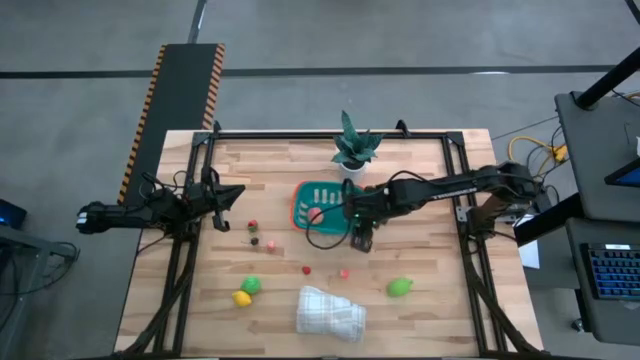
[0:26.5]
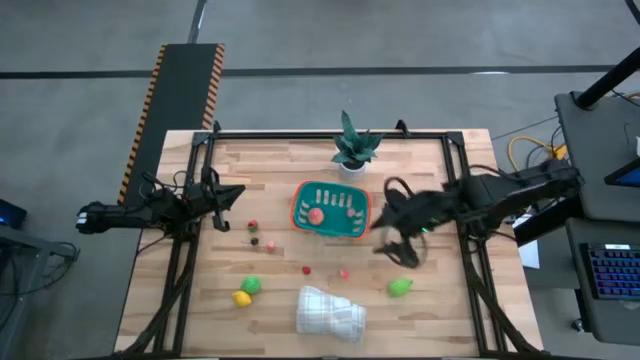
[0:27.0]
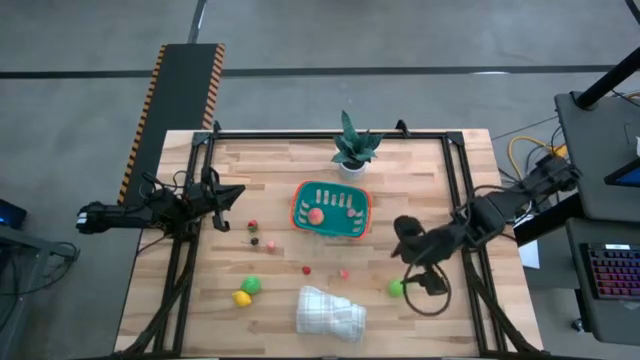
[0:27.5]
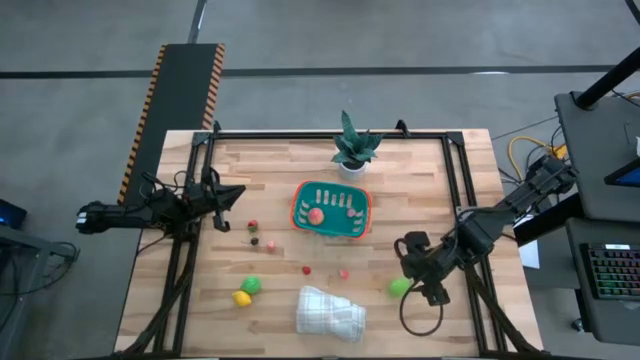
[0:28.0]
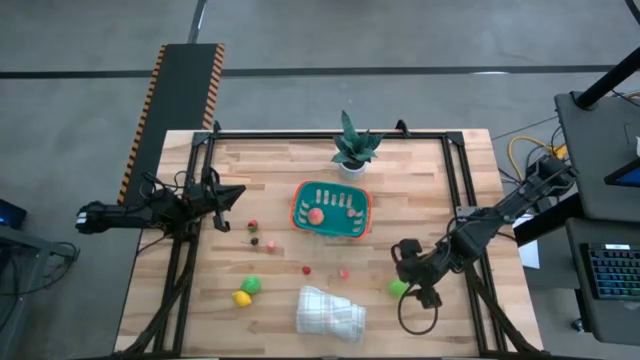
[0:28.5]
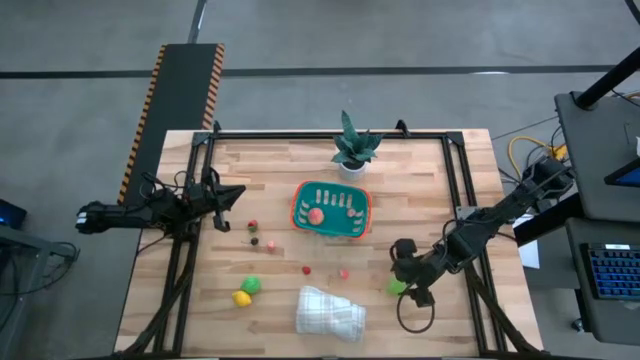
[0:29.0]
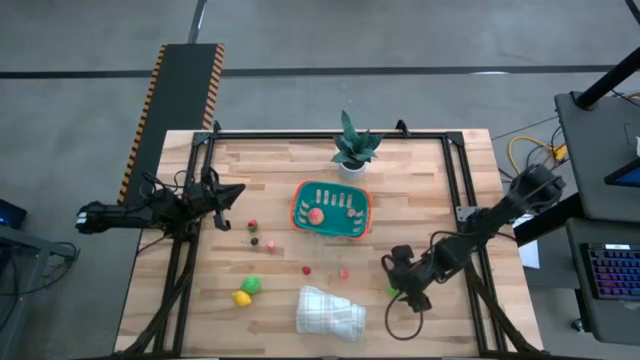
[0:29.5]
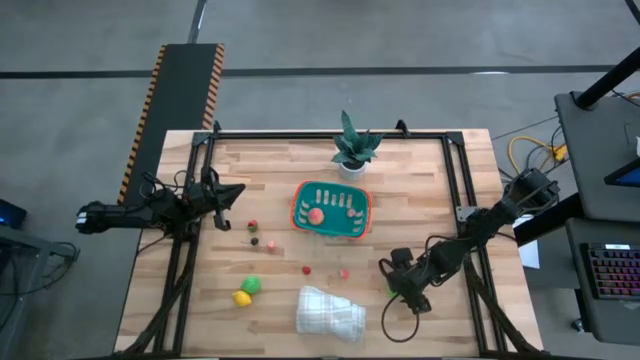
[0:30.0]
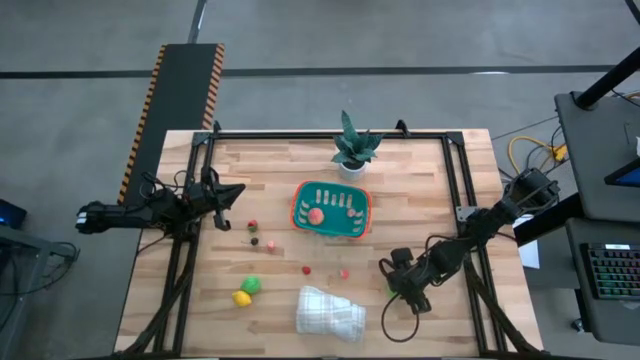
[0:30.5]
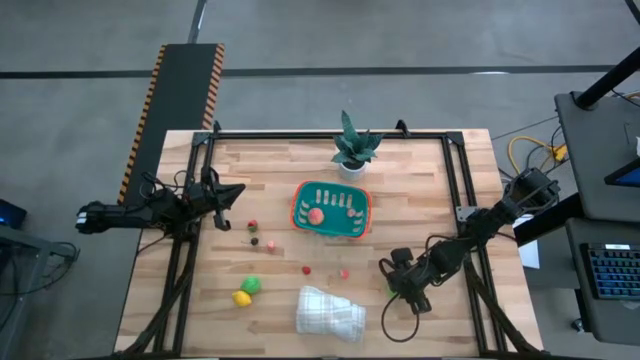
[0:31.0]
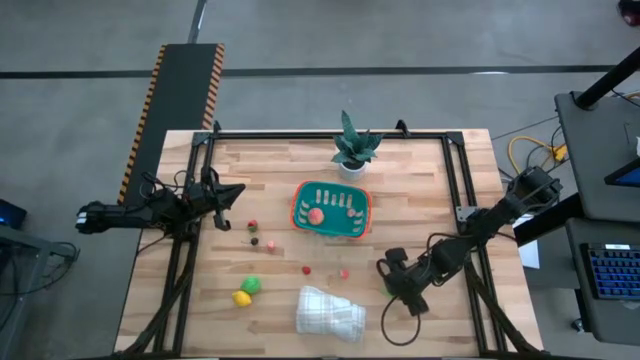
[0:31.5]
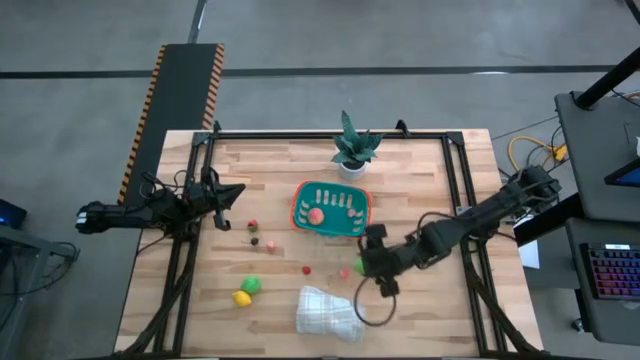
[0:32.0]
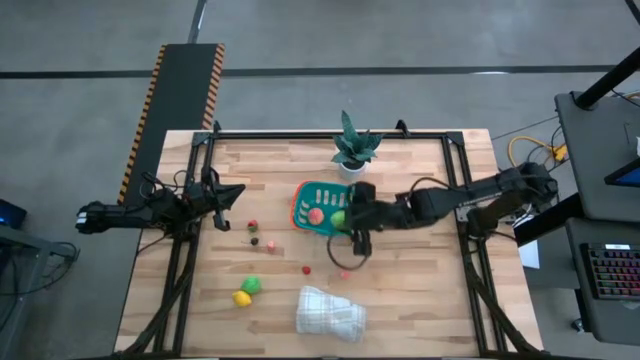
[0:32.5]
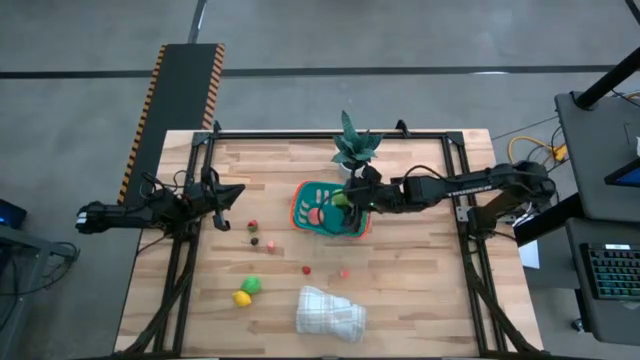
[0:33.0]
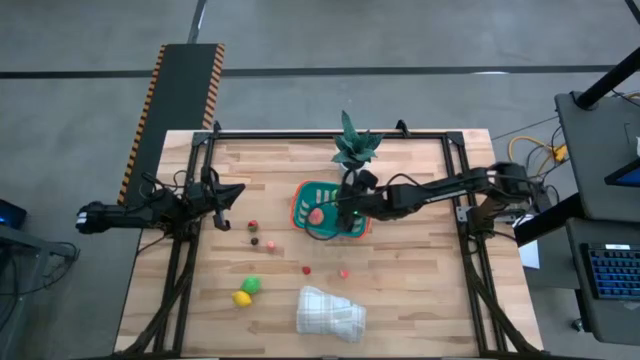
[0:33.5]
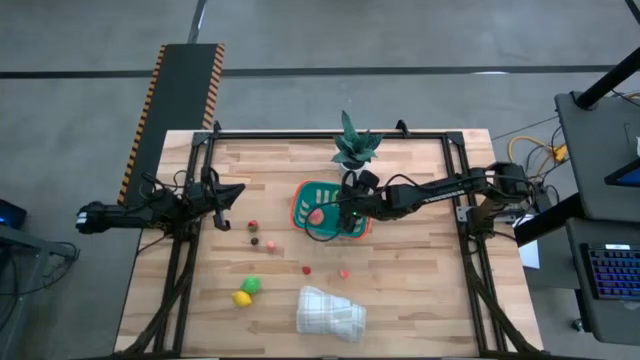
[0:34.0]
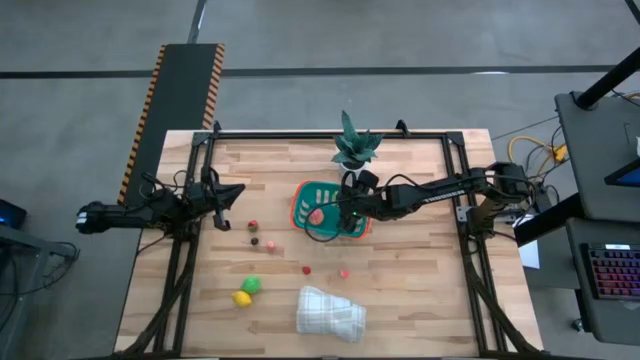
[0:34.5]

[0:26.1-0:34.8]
Task: Build produce basket
Put the green kiwi into the blue basket
